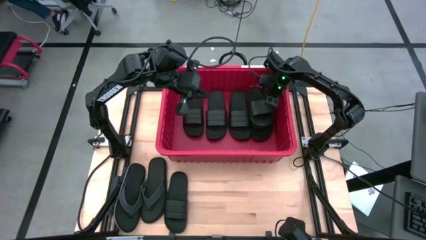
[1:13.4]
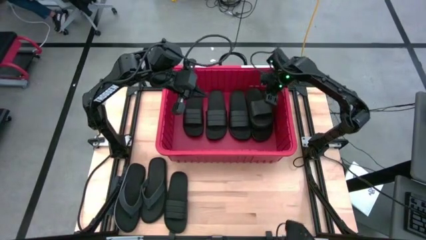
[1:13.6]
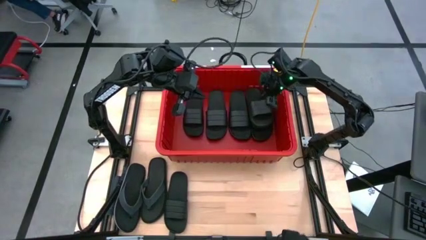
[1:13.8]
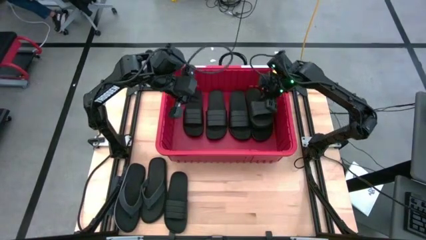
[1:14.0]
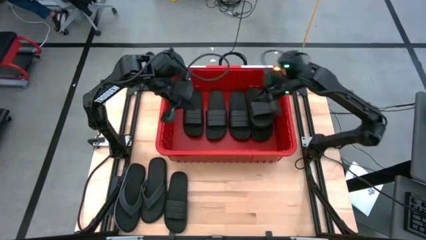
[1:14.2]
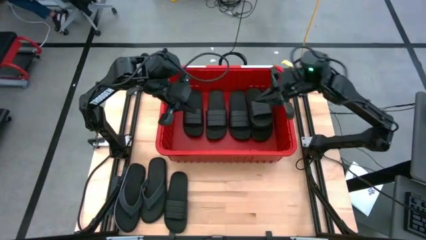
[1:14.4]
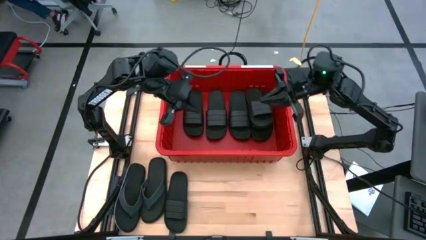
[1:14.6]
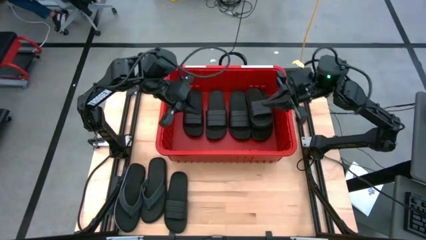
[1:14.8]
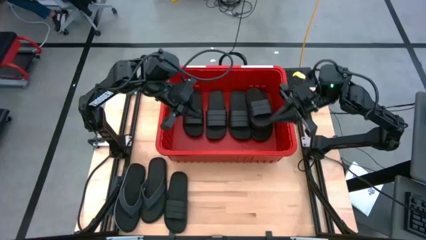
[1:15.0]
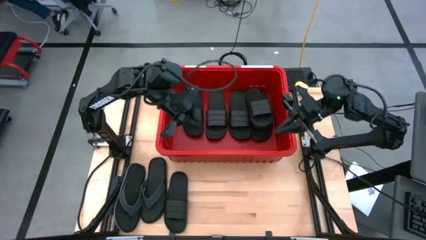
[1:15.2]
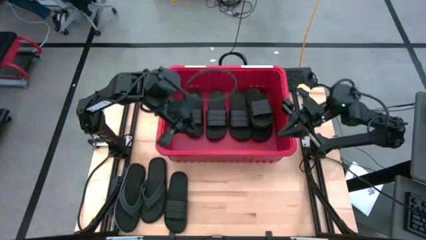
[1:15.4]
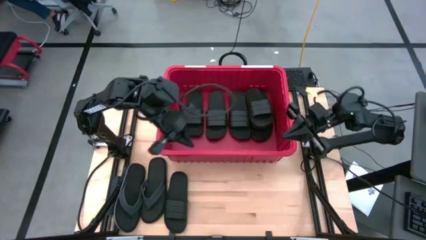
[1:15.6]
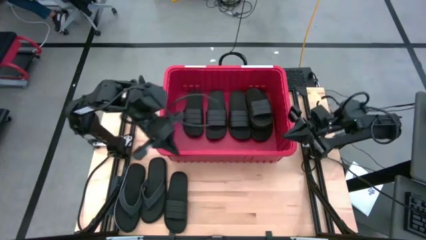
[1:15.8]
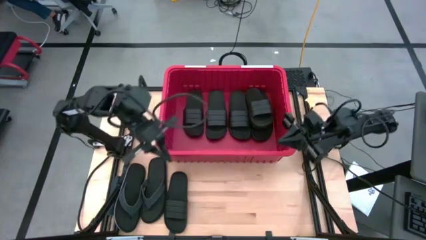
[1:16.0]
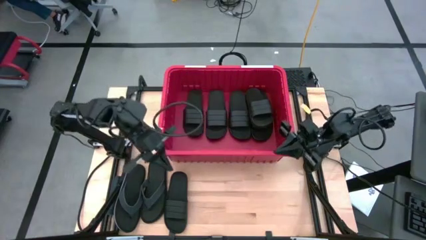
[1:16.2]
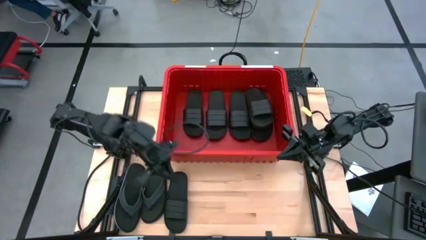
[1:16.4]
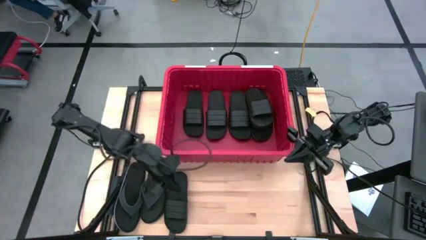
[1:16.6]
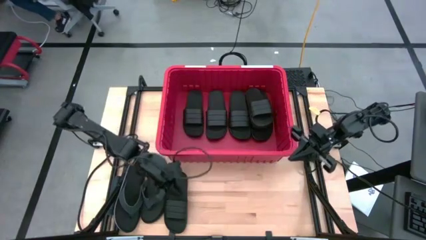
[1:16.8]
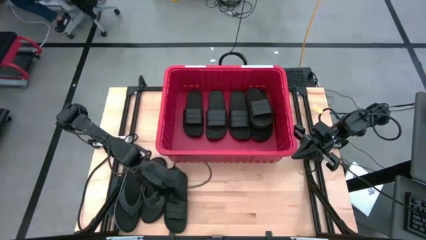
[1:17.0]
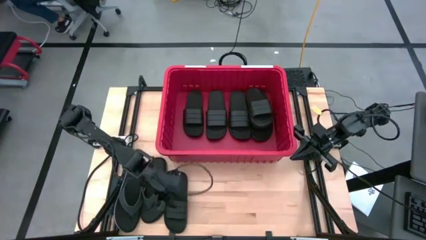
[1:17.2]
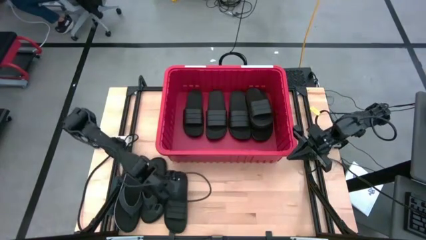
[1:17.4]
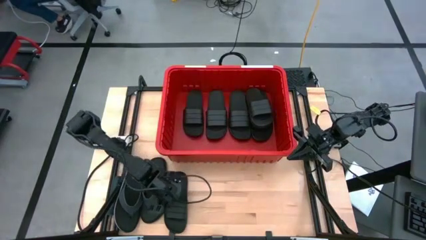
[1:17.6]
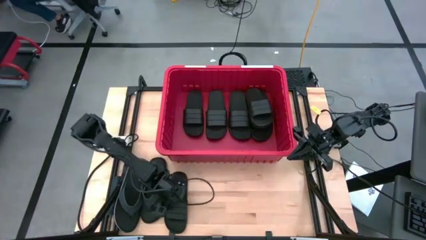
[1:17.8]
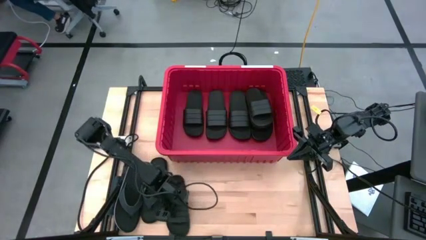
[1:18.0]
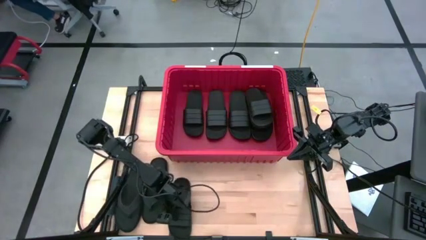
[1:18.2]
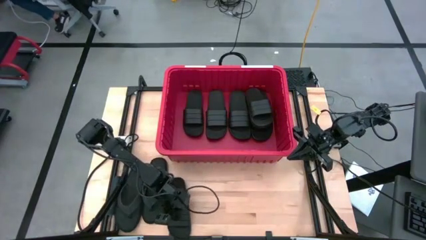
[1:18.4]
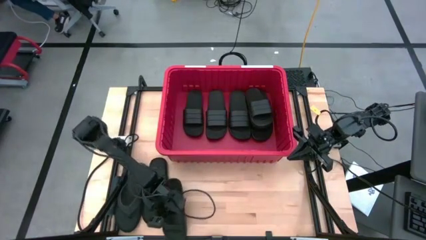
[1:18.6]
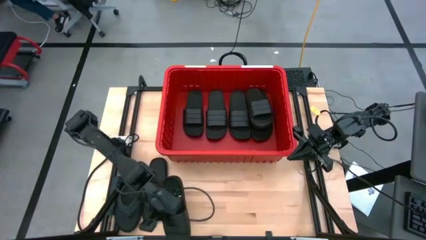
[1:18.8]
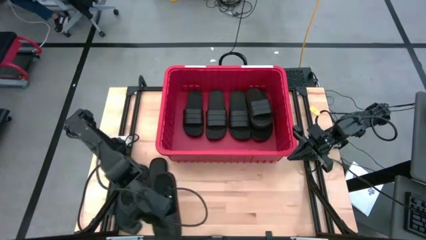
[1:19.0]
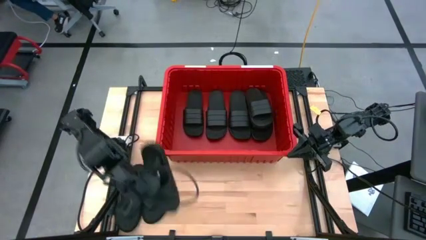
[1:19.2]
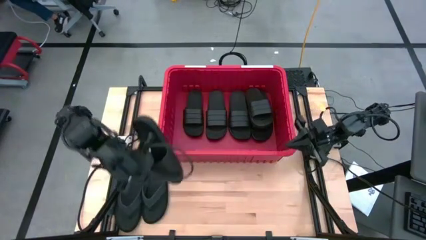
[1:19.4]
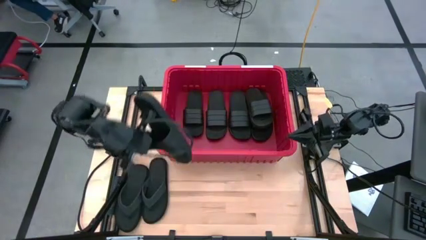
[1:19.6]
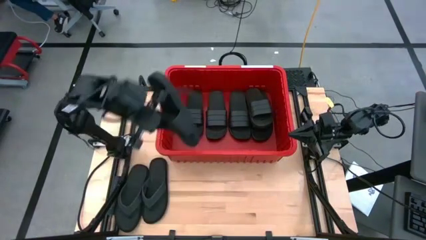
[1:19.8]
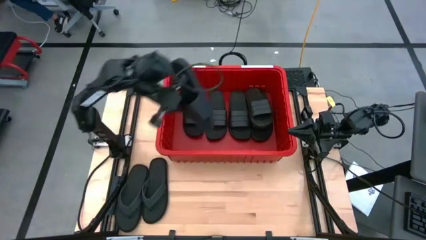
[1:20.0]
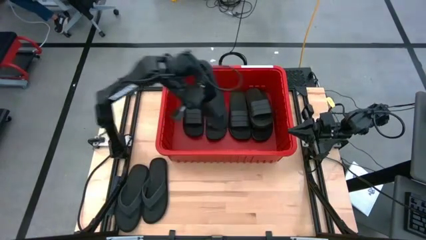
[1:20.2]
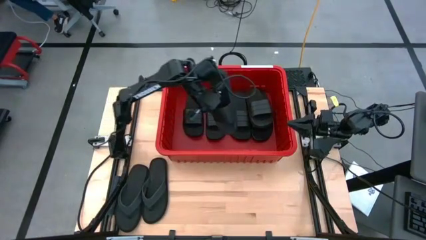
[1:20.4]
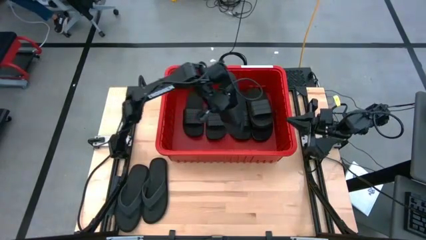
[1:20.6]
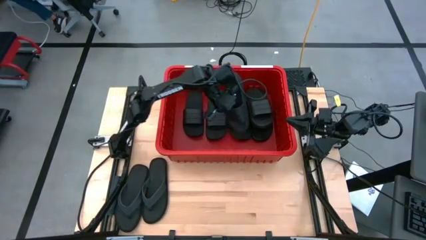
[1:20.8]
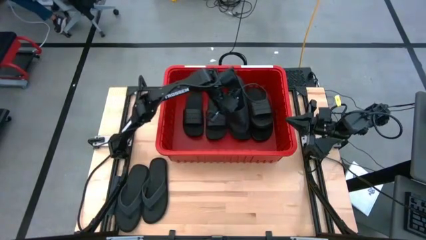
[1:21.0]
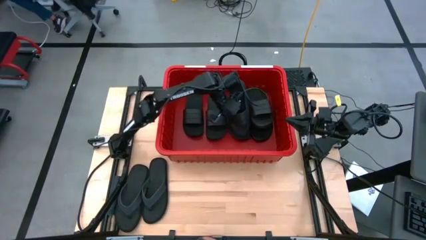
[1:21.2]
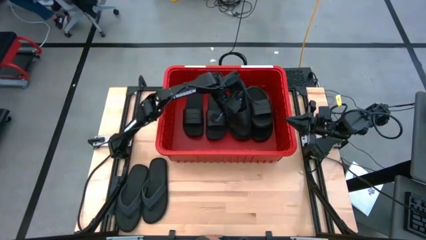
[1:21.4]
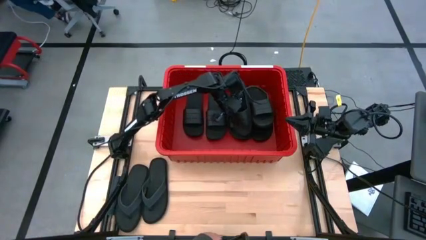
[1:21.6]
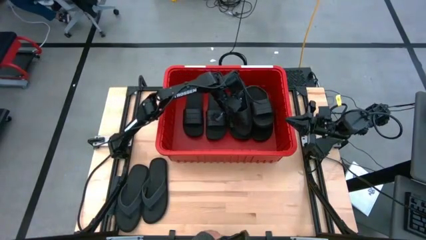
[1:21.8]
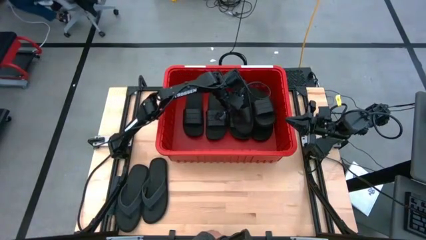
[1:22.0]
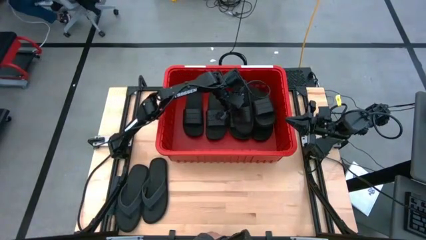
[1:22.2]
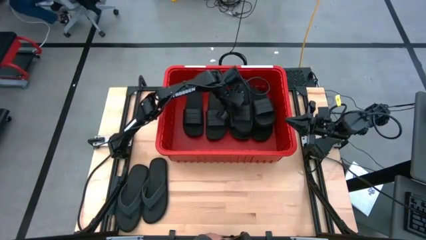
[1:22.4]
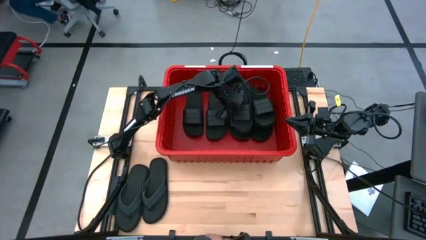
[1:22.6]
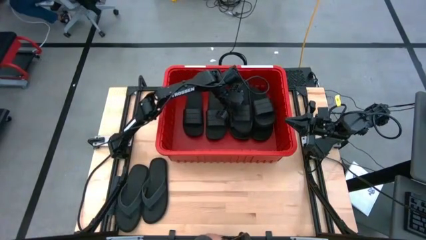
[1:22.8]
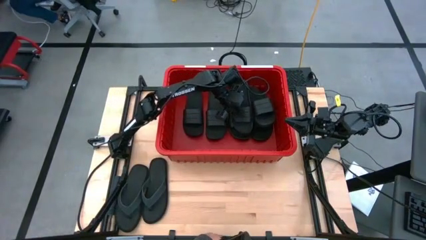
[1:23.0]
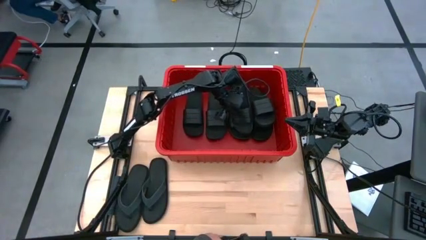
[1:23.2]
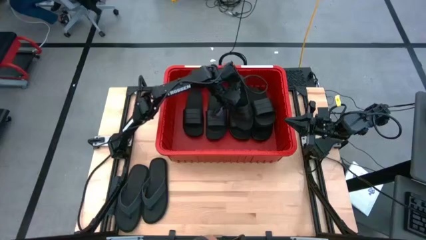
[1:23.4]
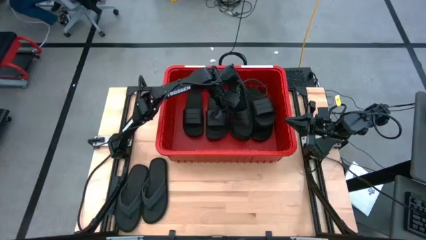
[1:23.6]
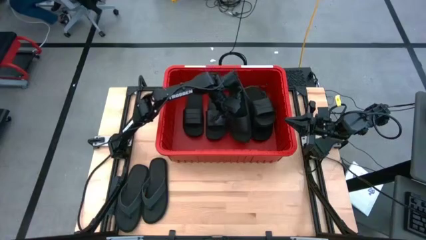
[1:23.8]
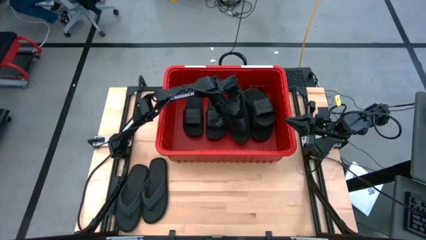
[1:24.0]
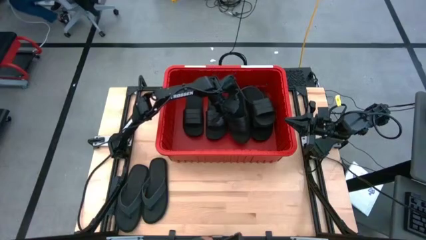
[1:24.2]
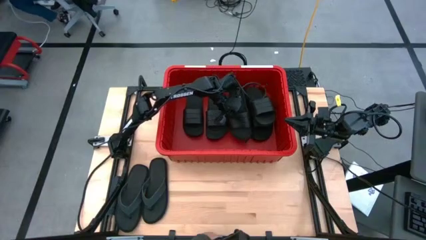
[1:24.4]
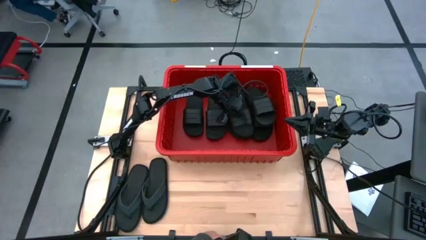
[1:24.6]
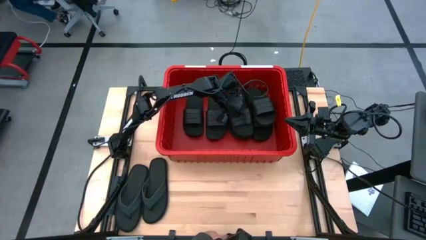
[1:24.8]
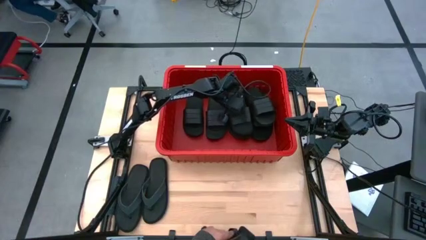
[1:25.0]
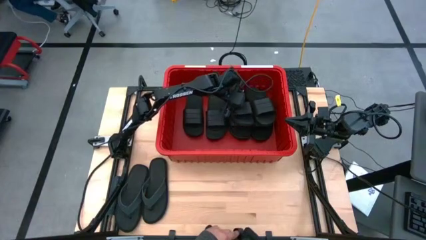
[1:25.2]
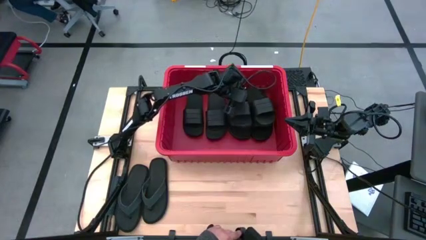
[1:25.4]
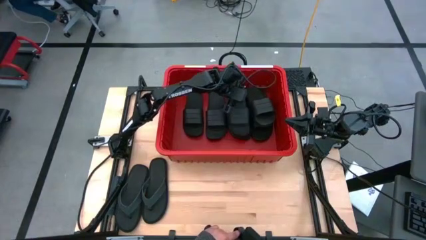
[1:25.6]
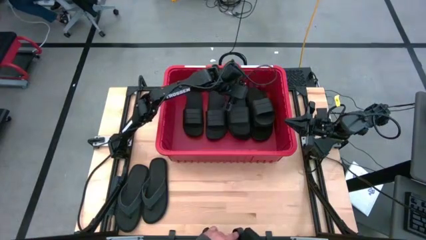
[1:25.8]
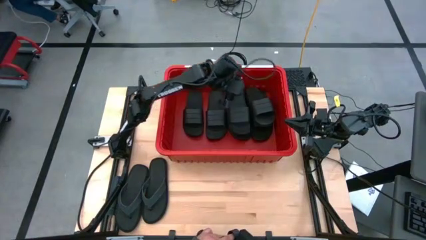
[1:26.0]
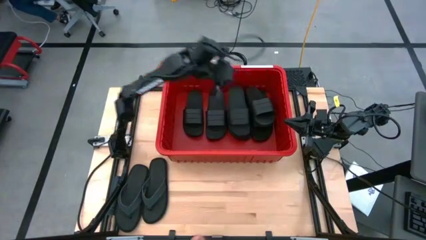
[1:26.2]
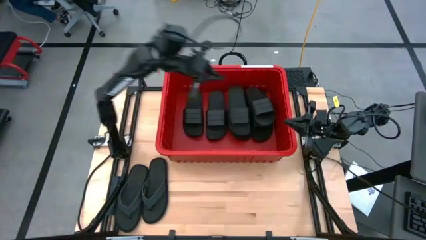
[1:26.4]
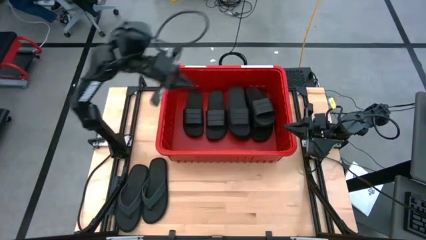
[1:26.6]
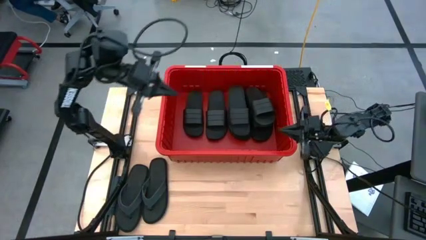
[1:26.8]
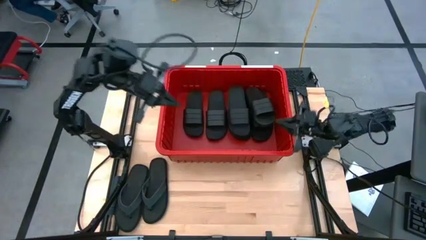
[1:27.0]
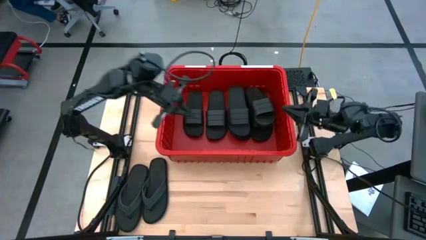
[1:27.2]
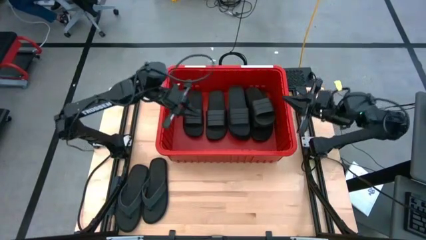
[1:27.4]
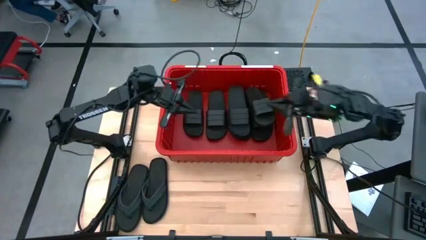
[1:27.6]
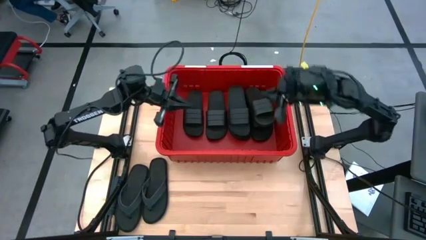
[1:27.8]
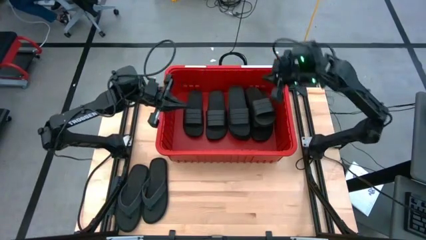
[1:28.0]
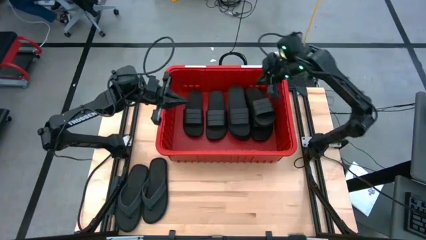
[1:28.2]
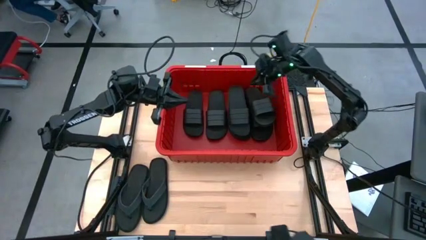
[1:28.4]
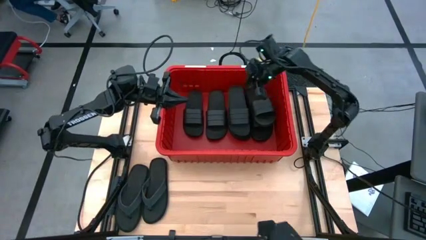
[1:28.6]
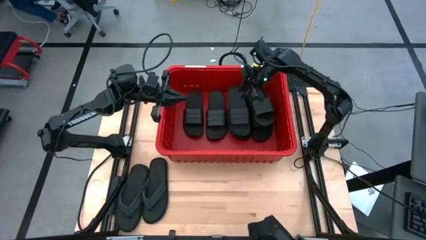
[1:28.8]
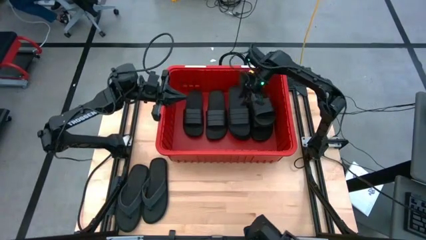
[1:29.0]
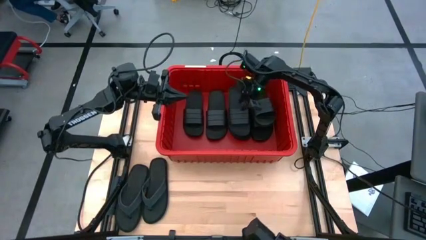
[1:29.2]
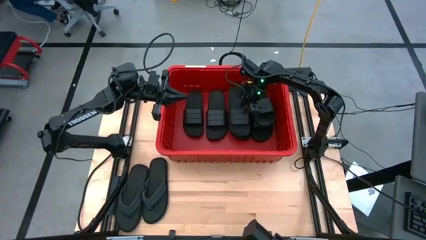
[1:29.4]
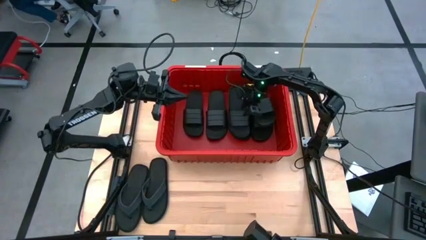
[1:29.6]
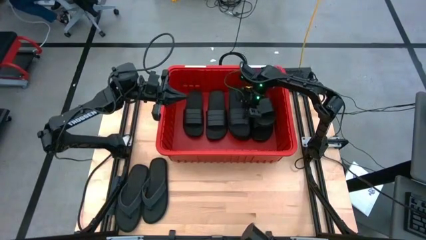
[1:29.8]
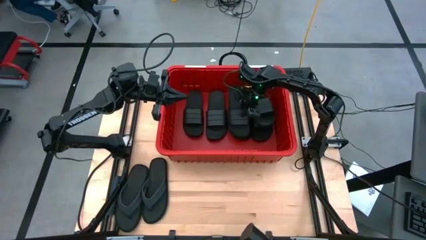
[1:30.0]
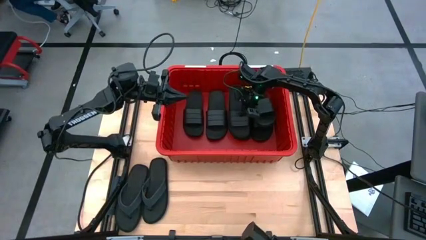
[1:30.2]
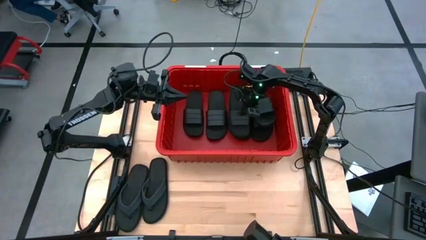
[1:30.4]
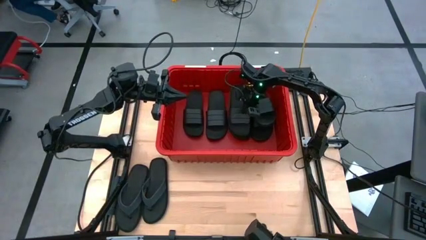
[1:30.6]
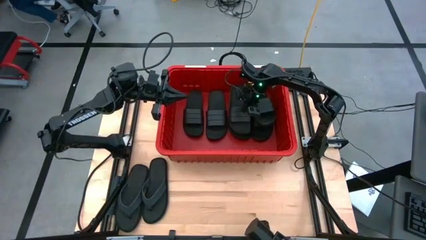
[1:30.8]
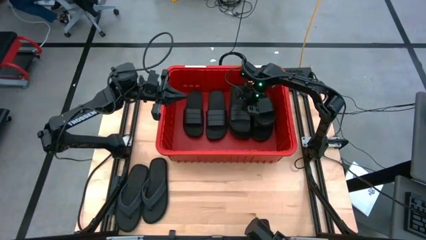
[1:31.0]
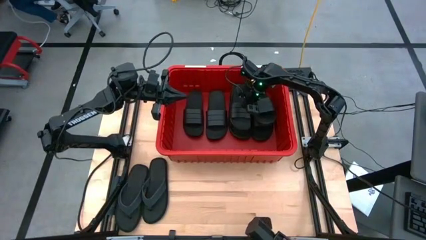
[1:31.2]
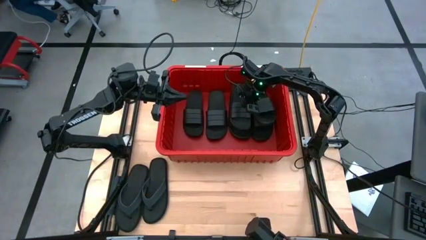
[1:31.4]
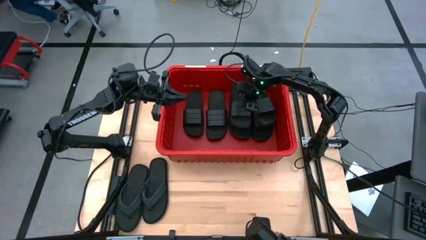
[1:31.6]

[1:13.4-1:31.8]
Task: Pick and place slides into bin
Put the black slide into the red bin
